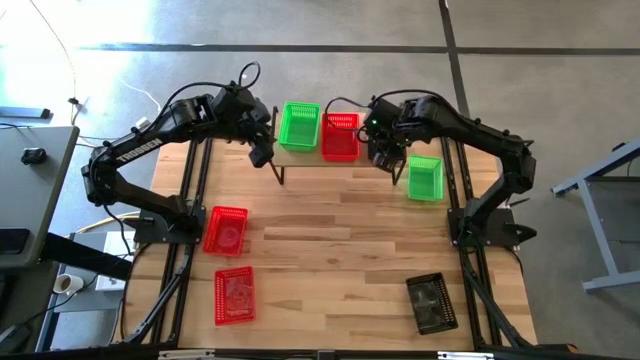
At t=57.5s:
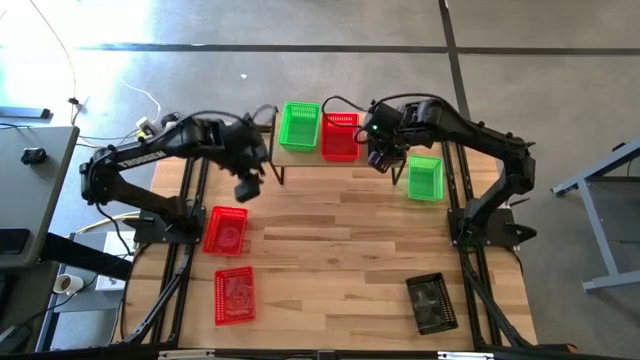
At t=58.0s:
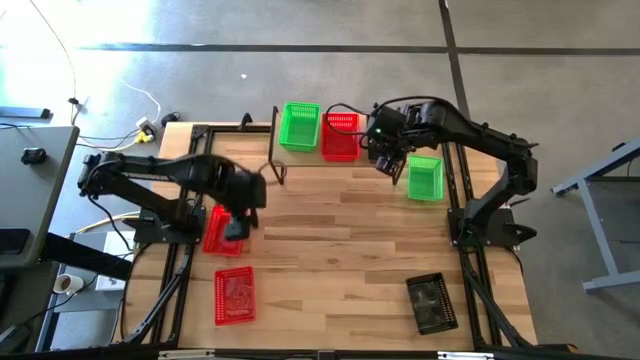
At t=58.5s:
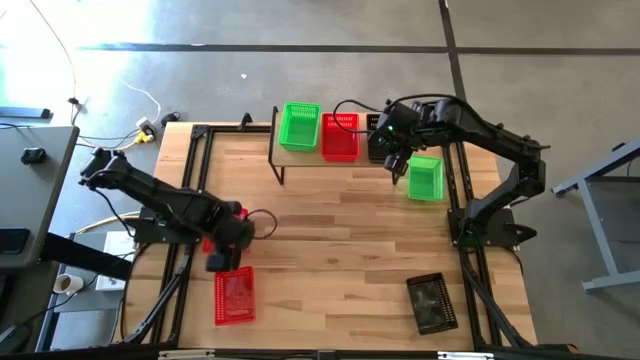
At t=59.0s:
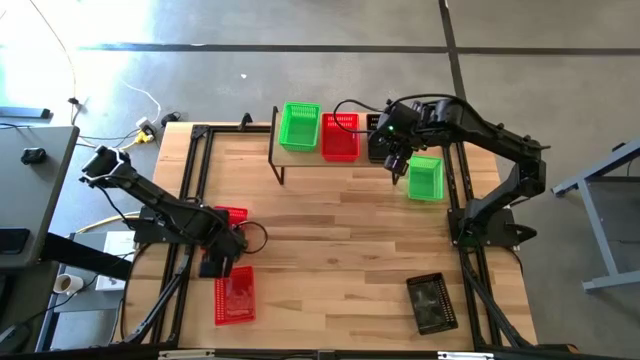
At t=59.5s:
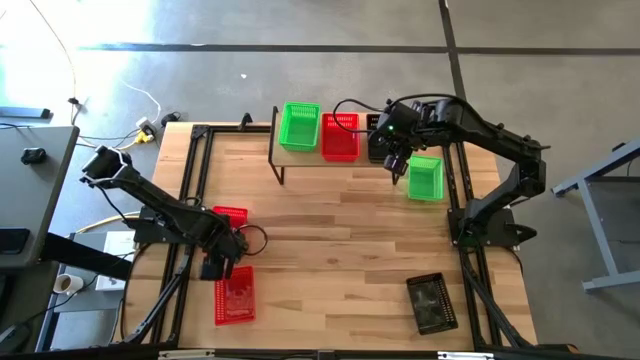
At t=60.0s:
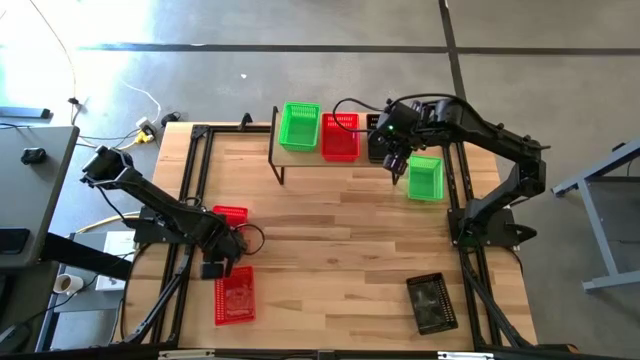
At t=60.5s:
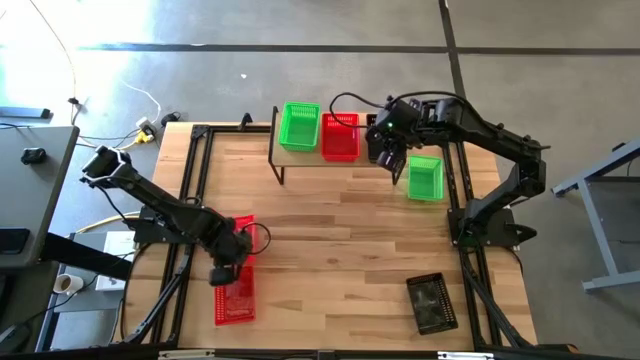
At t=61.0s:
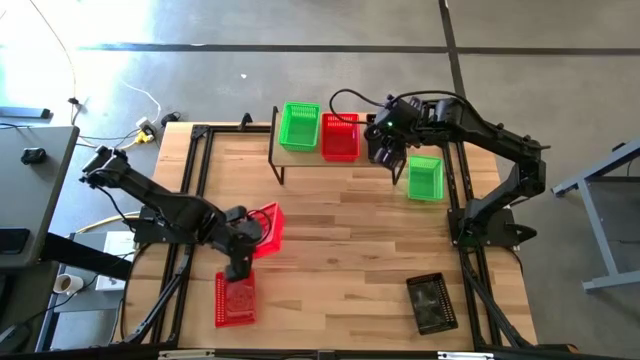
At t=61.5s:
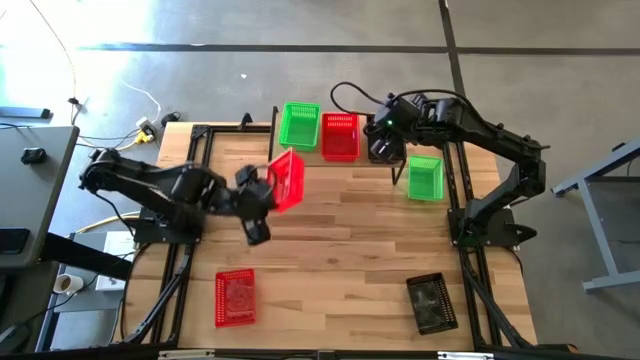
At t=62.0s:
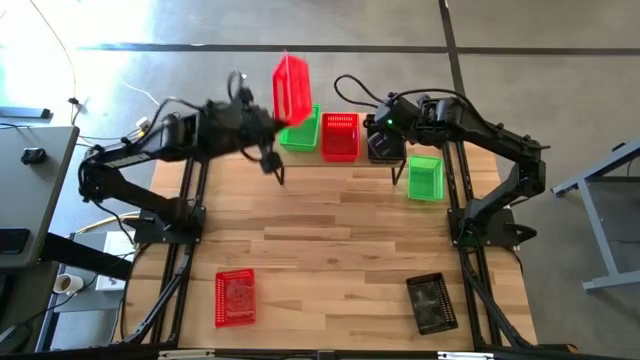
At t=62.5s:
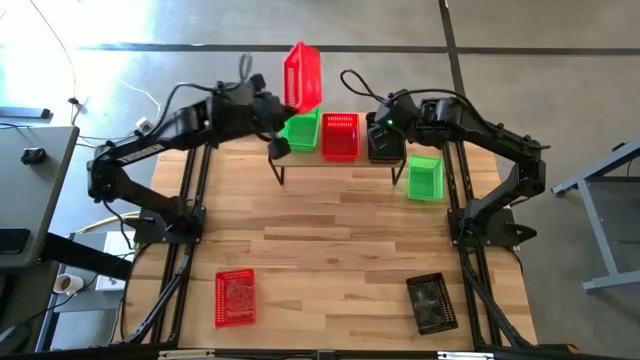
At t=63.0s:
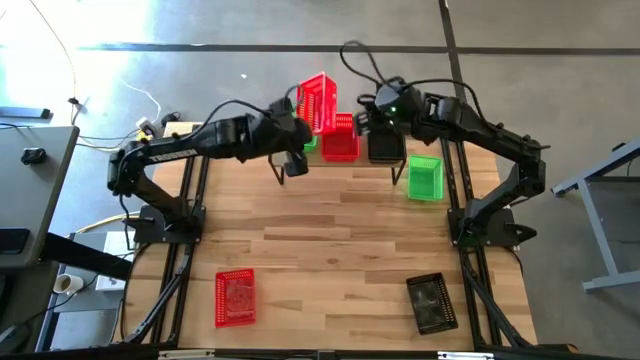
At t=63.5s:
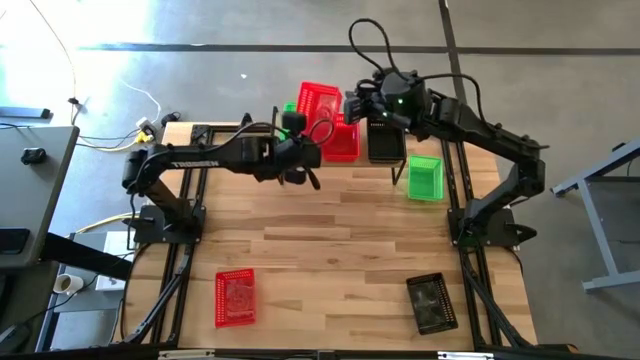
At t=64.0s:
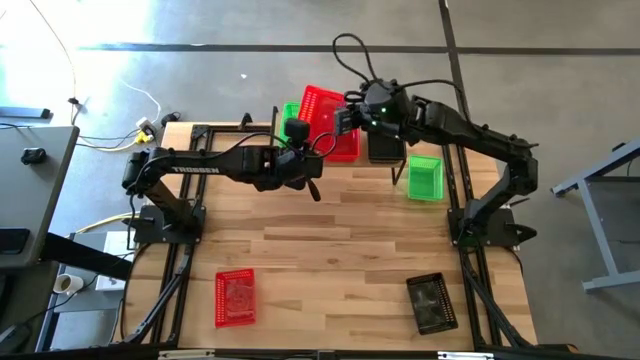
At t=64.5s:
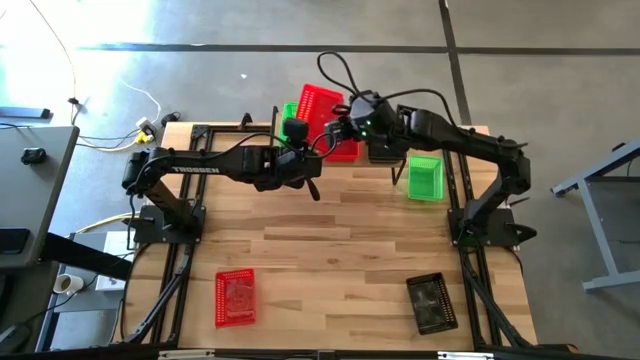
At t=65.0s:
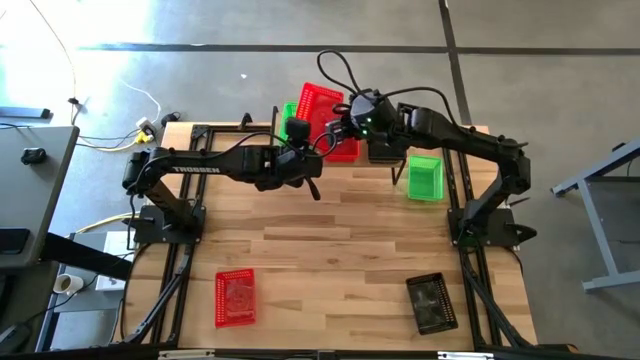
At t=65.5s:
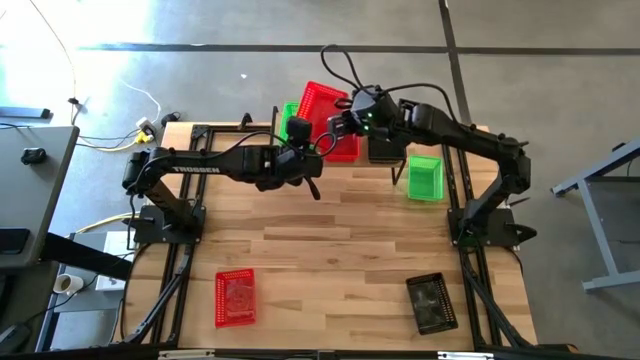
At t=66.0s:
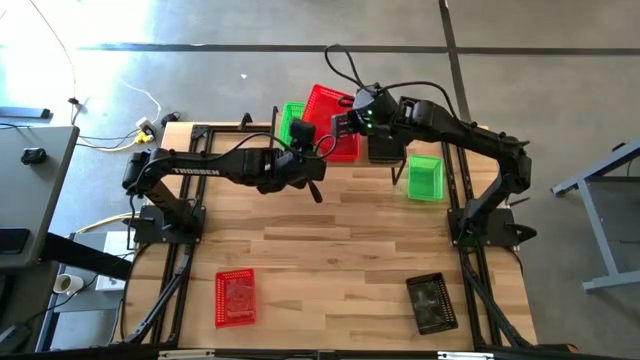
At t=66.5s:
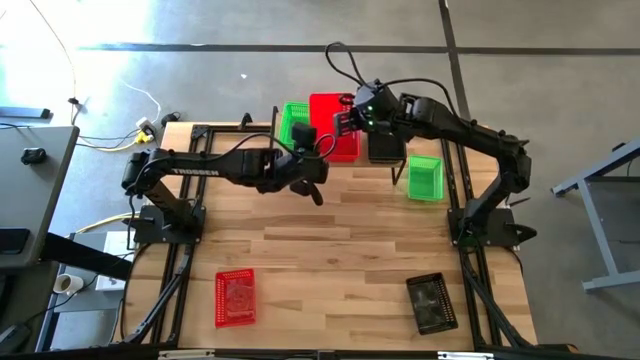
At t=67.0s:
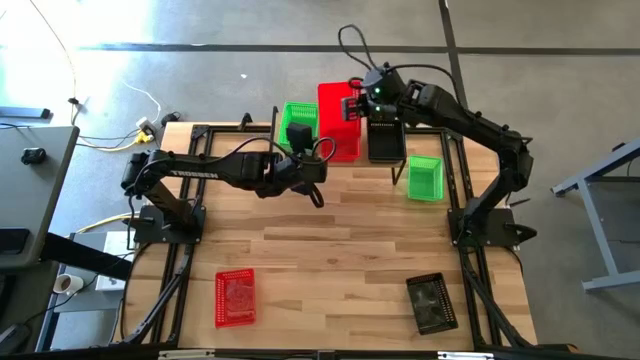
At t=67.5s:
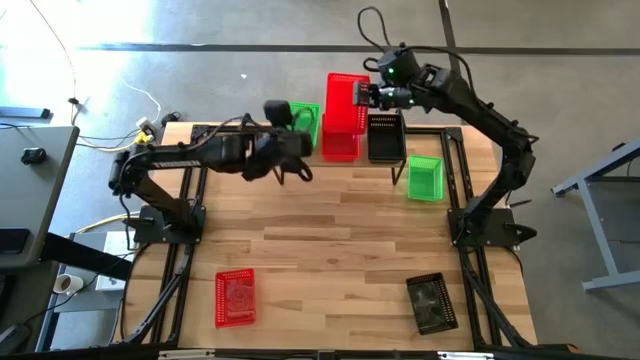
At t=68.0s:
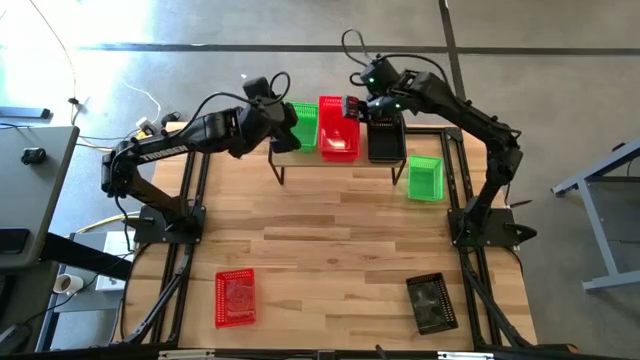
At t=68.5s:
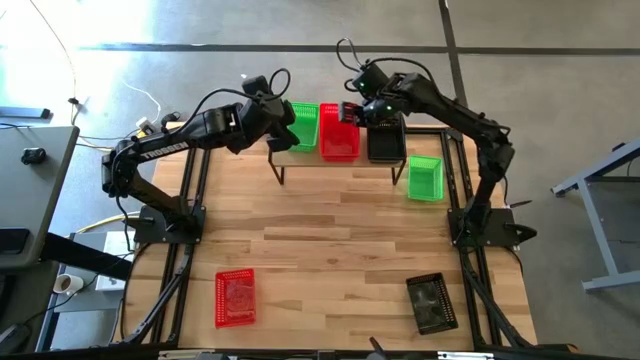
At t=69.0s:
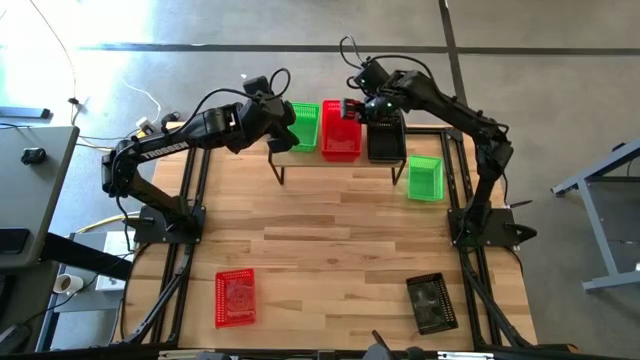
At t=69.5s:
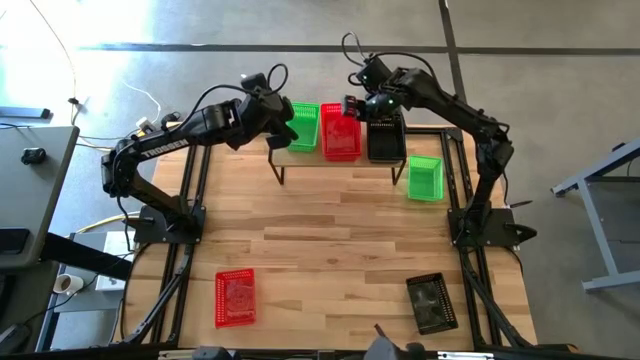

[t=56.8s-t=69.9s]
Task: Stack baskets on shelf by color
Stack the top red bin on top of the red bin on the shelf

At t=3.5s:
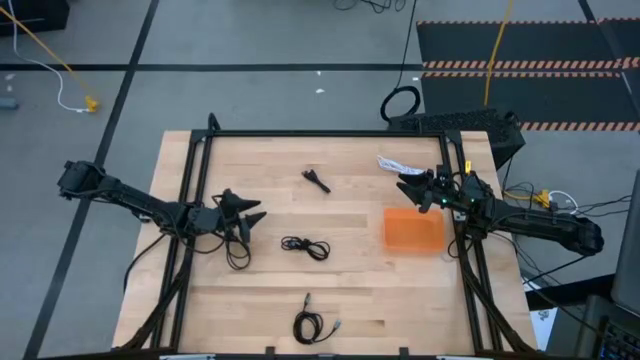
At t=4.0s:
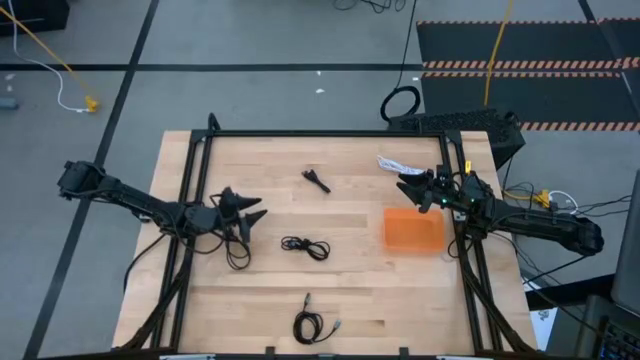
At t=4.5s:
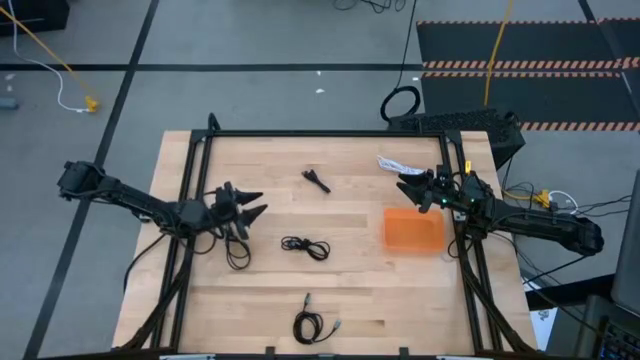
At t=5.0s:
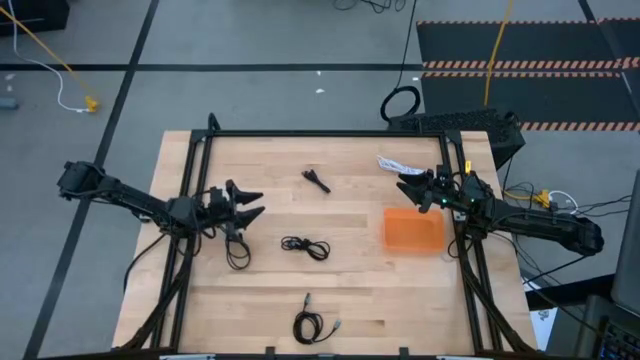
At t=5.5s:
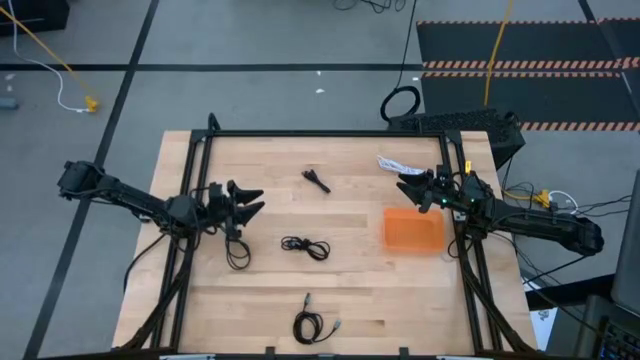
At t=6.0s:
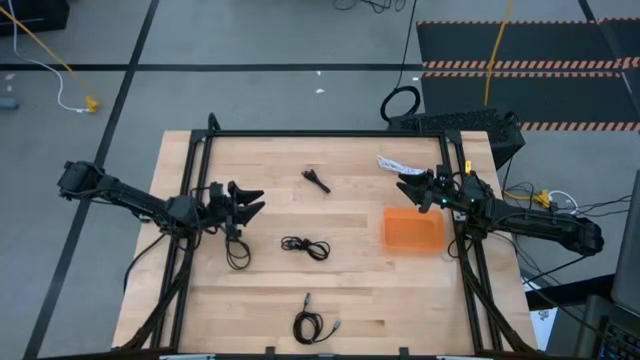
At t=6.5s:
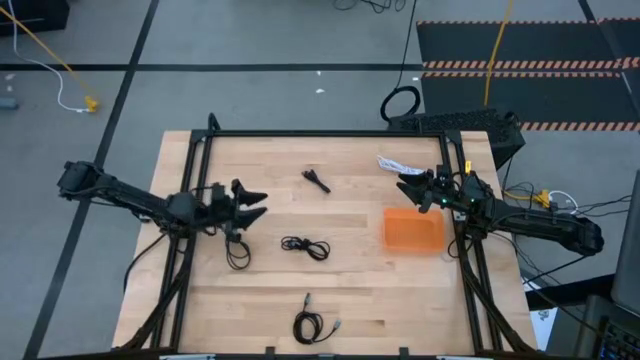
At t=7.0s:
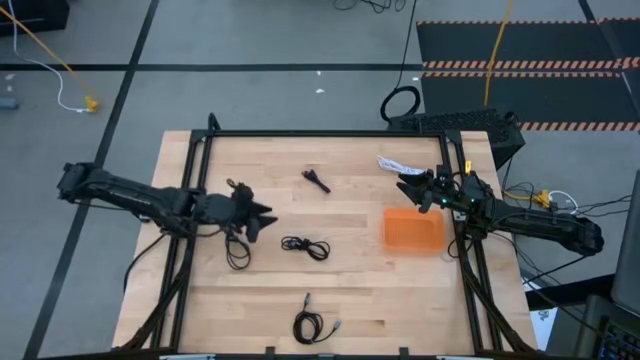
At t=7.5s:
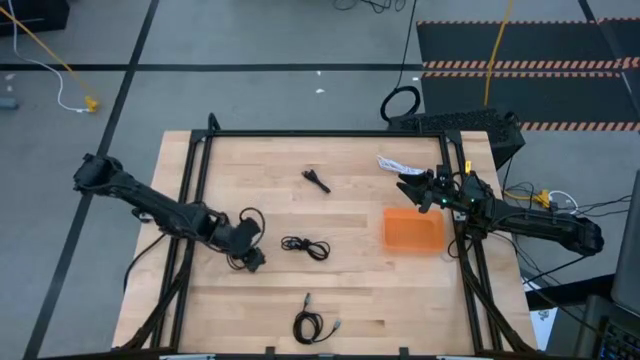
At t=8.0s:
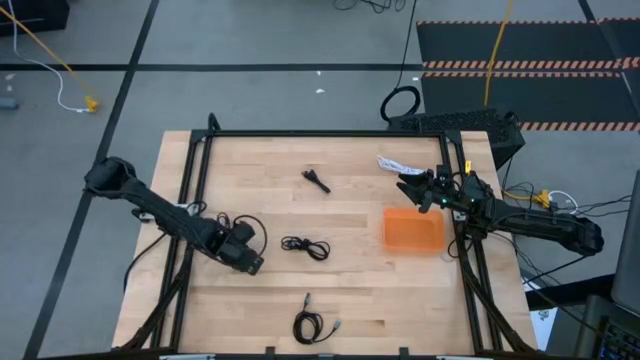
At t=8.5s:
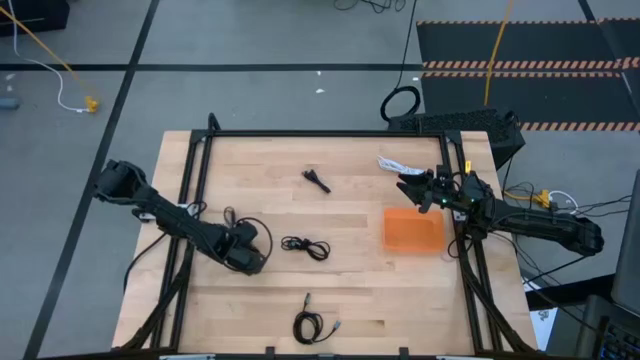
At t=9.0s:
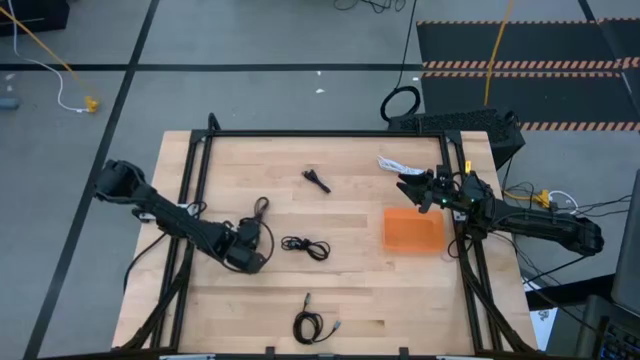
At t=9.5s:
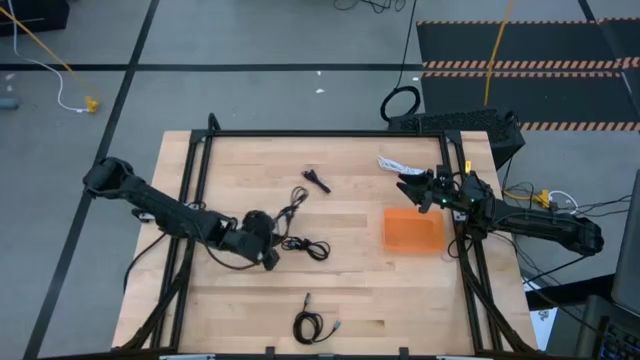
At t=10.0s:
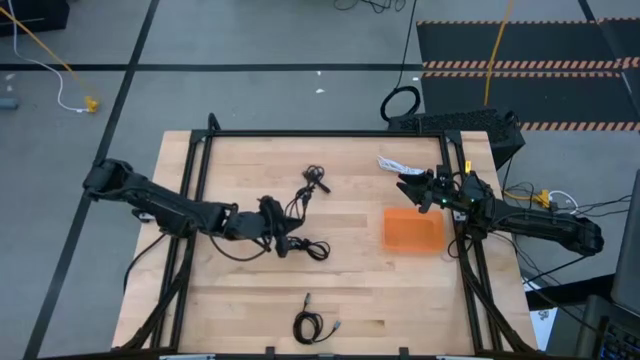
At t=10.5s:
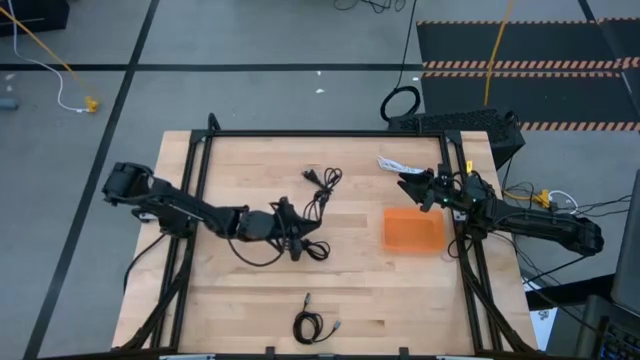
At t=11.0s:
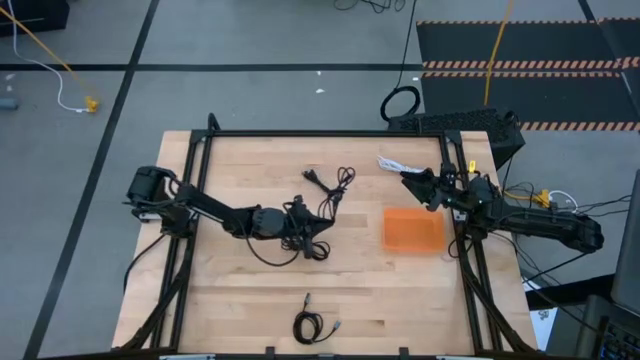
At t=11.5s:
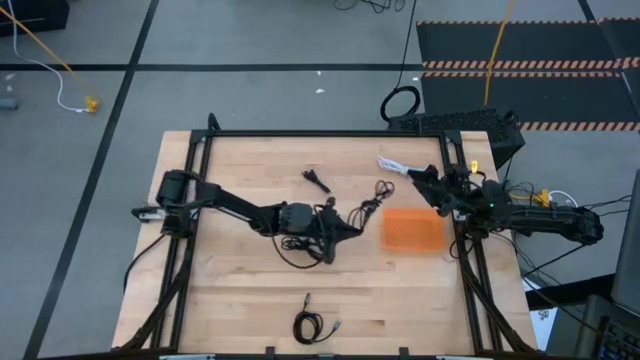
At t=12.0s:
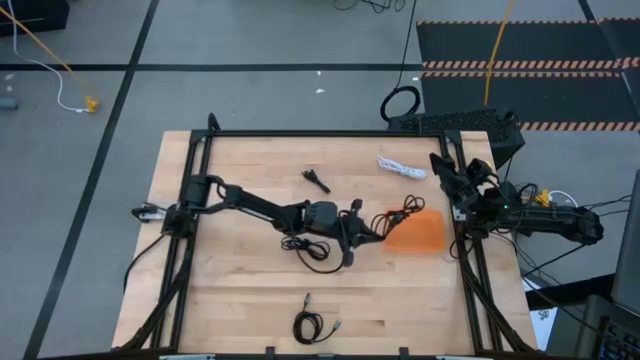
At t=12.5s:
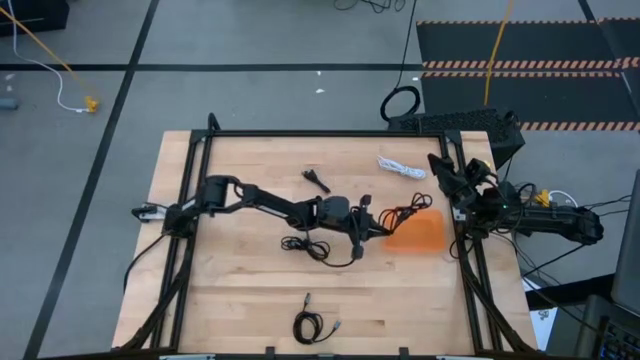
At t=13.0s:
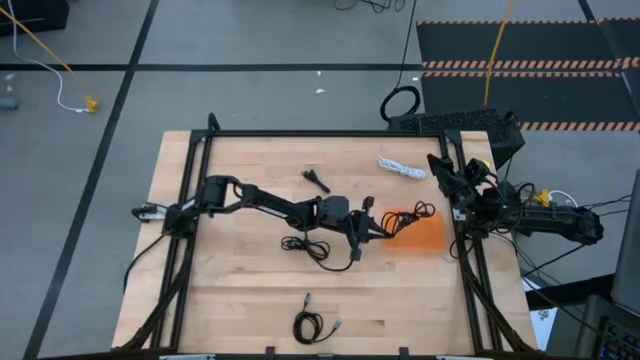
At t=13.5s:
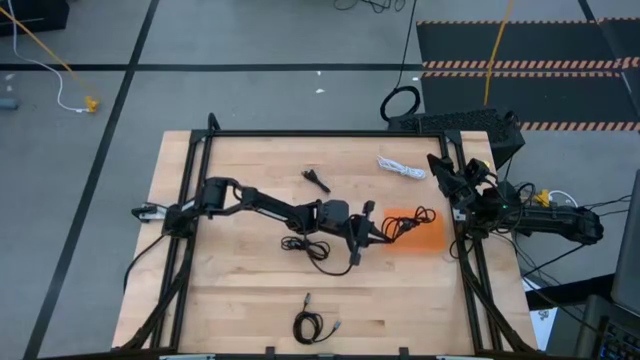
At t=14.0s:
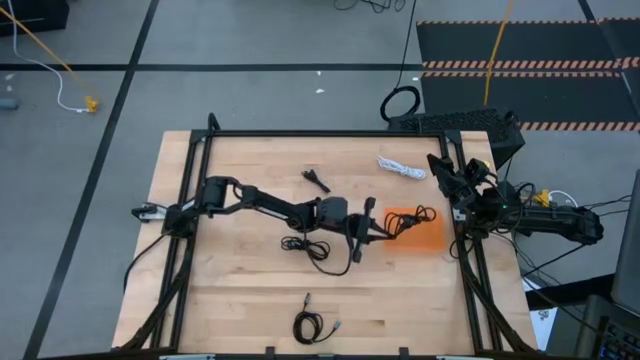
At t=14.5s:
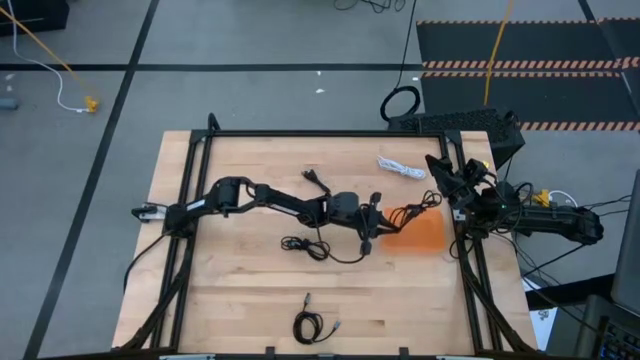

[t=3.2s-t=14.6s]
Task: Pick and place USB-C Cables
Put the middle left black charger cable into the orange bin
